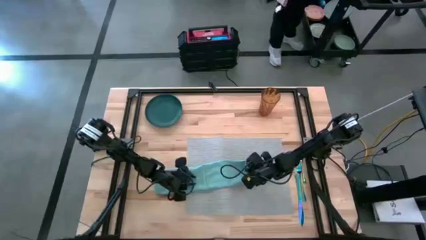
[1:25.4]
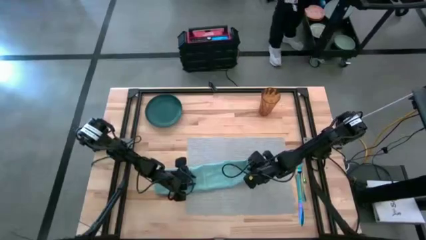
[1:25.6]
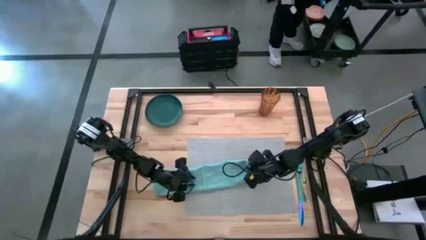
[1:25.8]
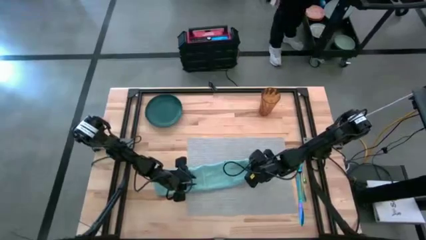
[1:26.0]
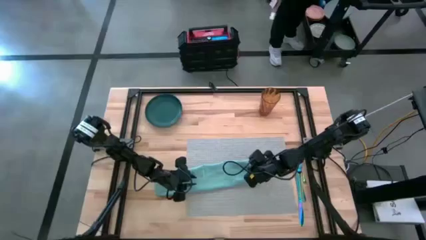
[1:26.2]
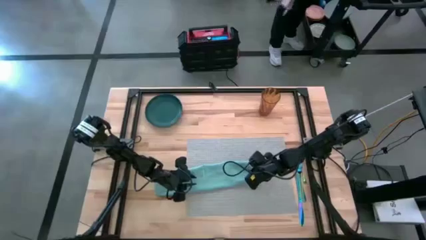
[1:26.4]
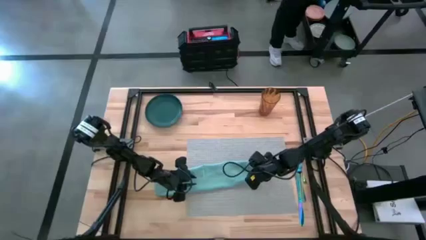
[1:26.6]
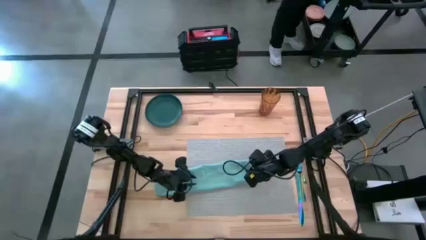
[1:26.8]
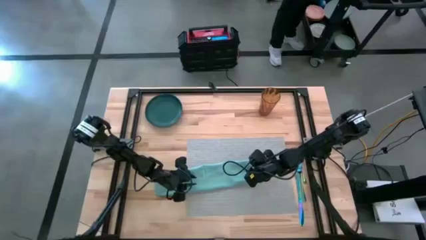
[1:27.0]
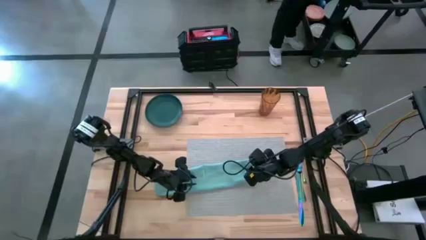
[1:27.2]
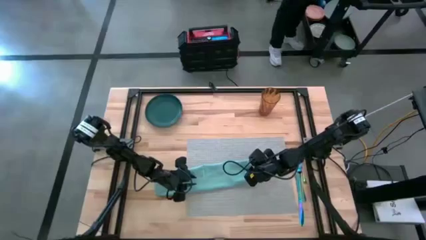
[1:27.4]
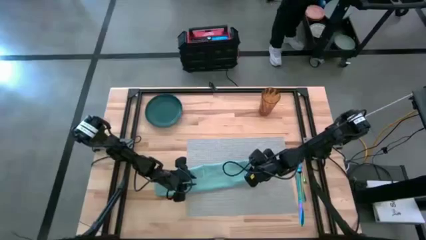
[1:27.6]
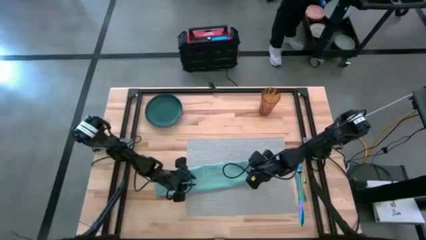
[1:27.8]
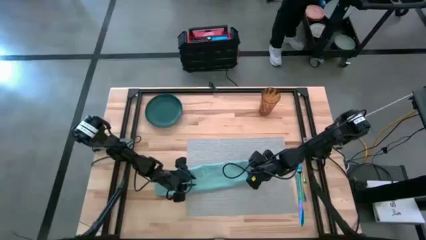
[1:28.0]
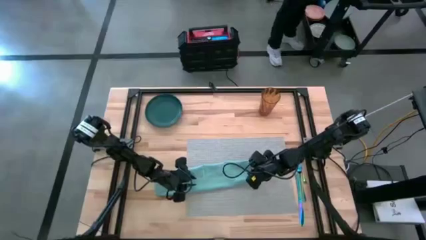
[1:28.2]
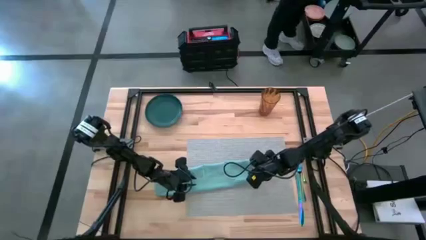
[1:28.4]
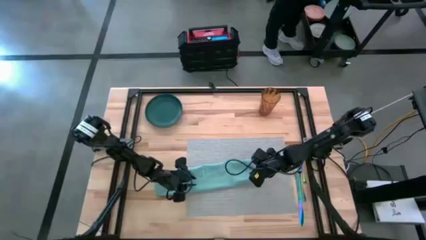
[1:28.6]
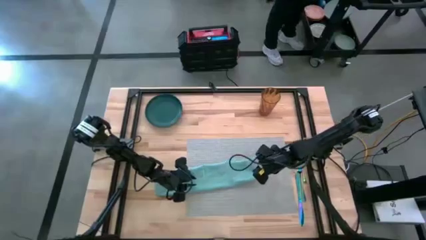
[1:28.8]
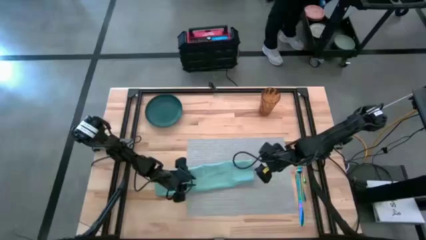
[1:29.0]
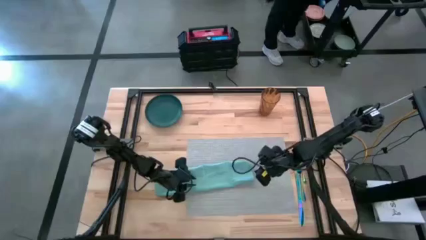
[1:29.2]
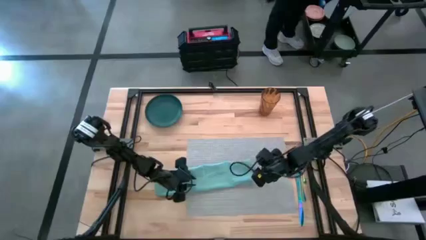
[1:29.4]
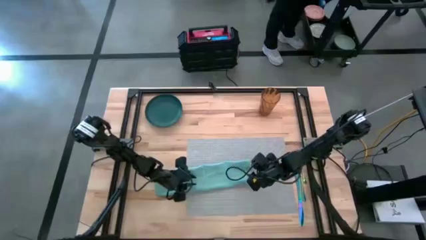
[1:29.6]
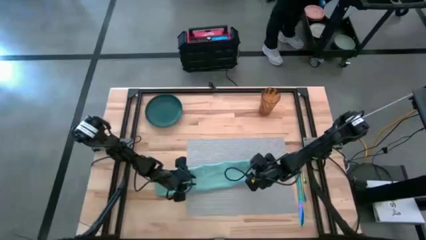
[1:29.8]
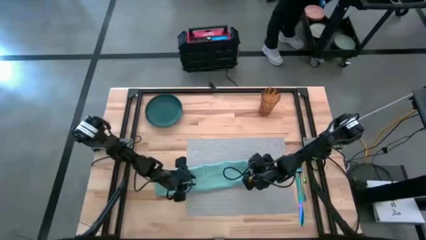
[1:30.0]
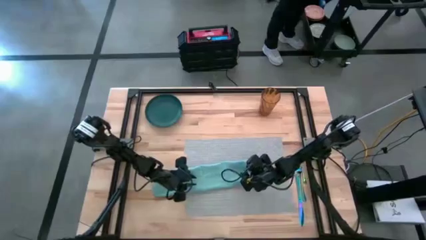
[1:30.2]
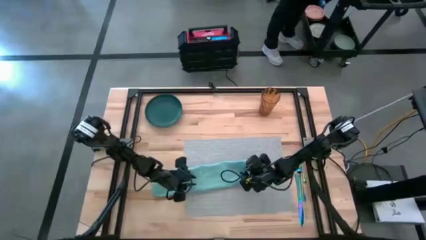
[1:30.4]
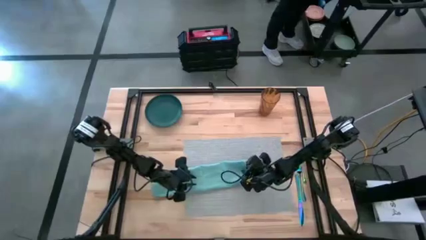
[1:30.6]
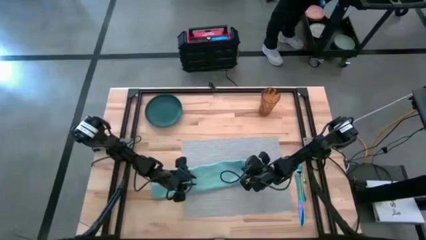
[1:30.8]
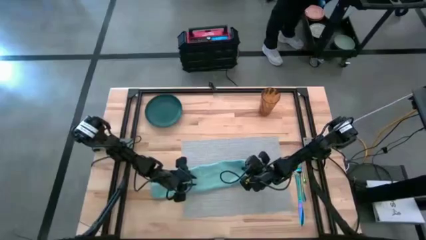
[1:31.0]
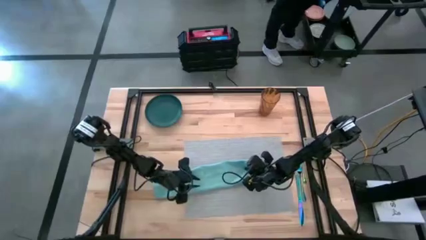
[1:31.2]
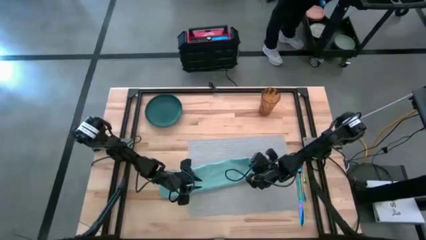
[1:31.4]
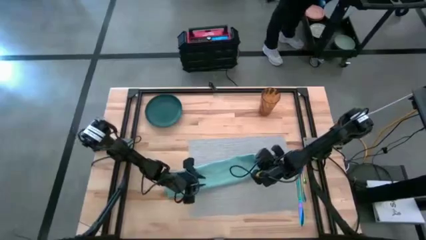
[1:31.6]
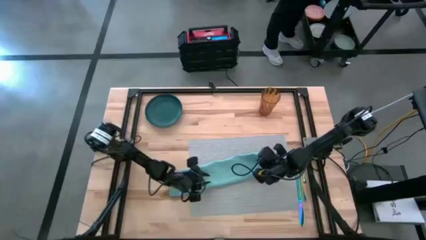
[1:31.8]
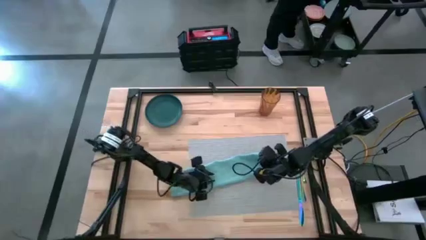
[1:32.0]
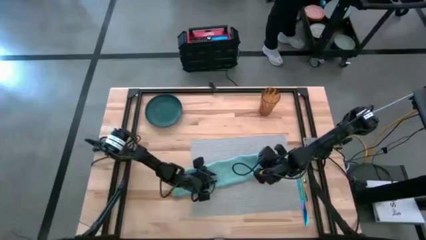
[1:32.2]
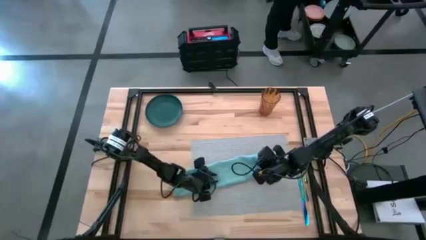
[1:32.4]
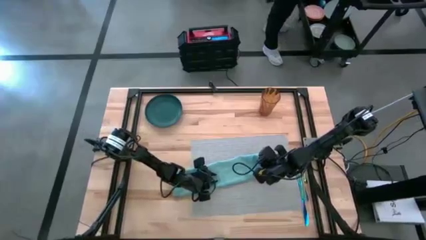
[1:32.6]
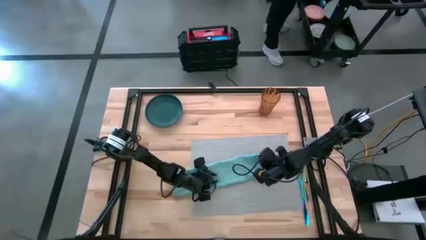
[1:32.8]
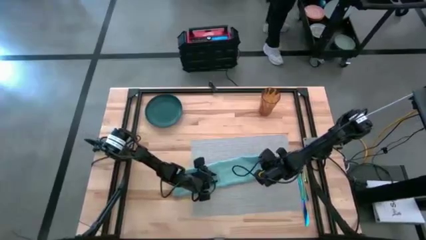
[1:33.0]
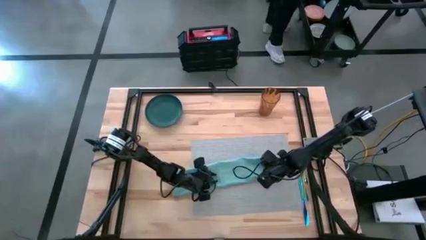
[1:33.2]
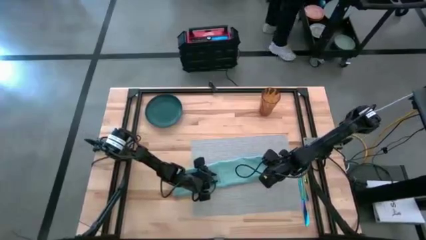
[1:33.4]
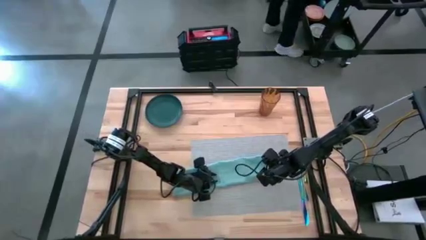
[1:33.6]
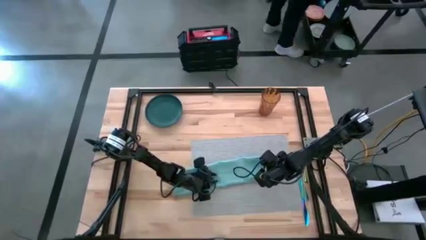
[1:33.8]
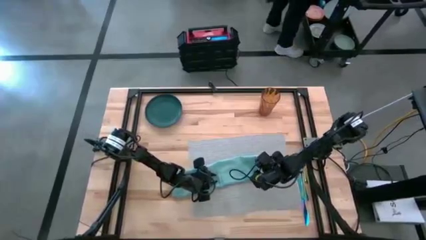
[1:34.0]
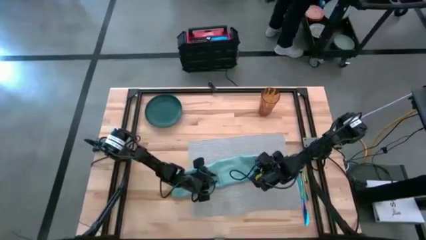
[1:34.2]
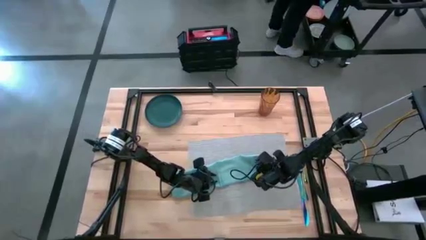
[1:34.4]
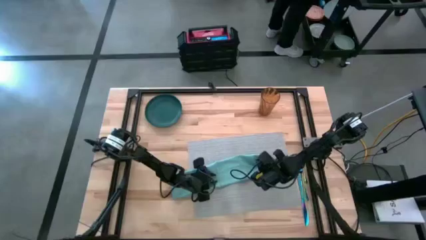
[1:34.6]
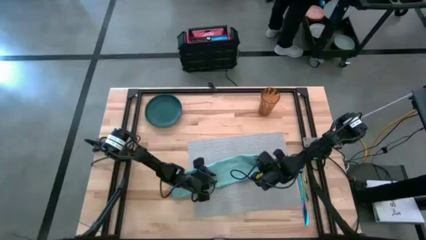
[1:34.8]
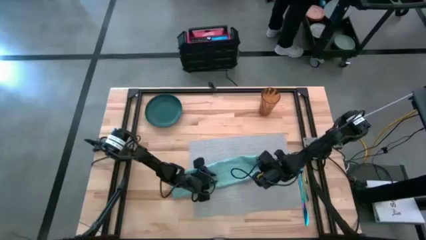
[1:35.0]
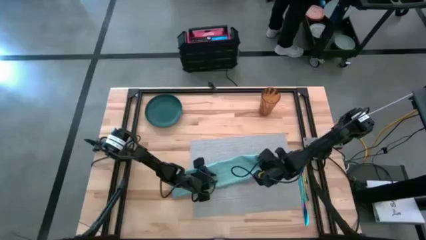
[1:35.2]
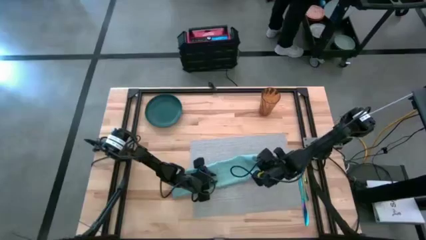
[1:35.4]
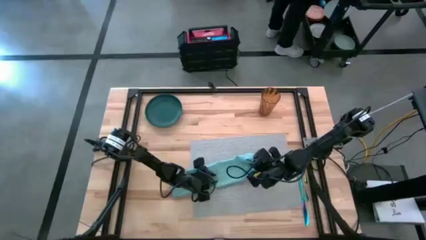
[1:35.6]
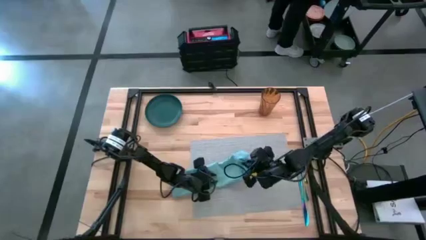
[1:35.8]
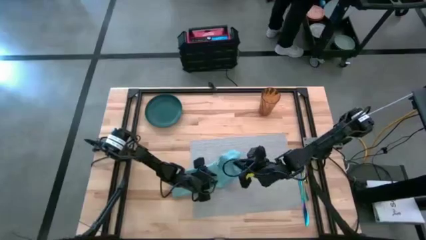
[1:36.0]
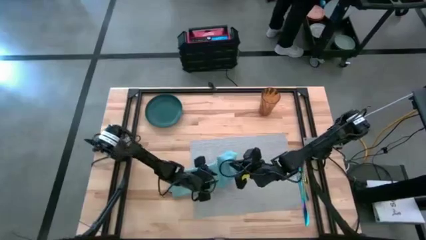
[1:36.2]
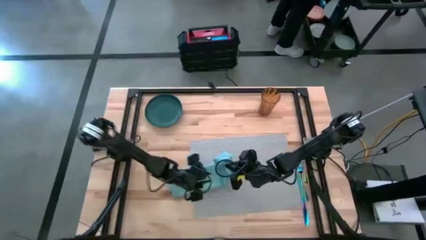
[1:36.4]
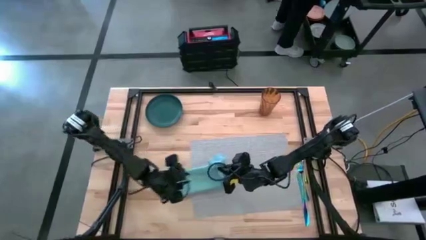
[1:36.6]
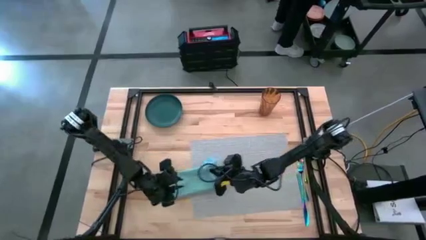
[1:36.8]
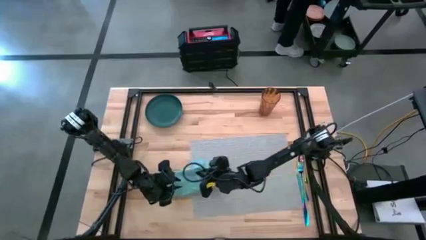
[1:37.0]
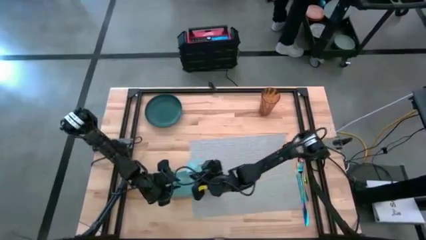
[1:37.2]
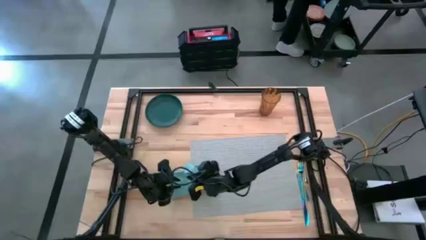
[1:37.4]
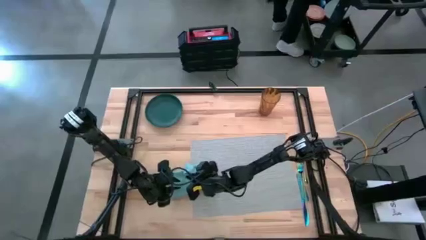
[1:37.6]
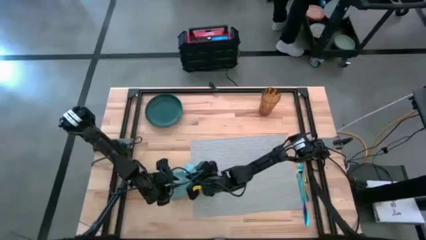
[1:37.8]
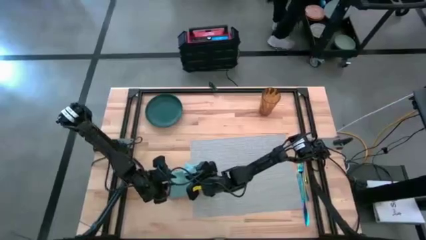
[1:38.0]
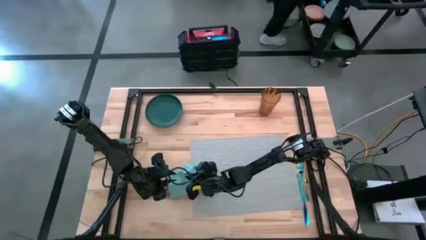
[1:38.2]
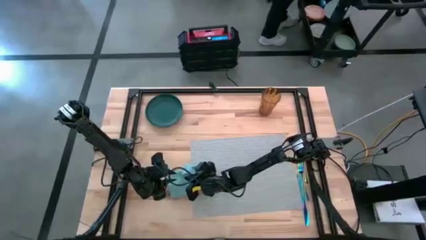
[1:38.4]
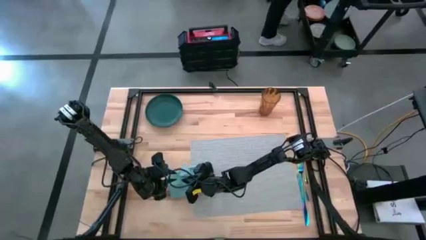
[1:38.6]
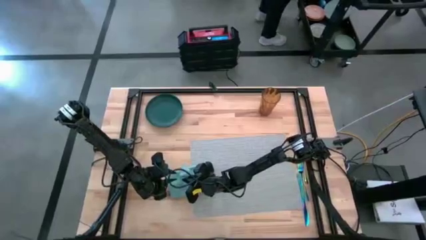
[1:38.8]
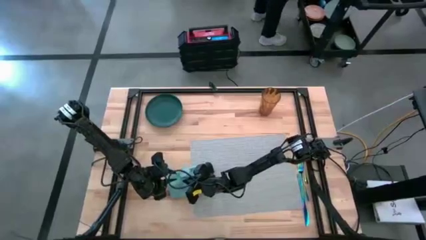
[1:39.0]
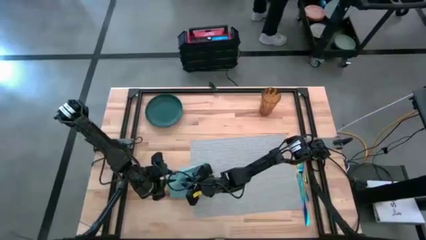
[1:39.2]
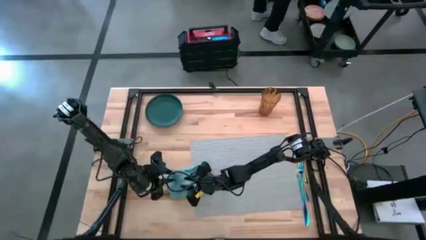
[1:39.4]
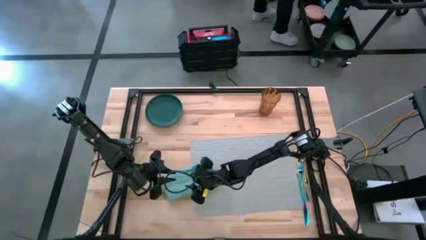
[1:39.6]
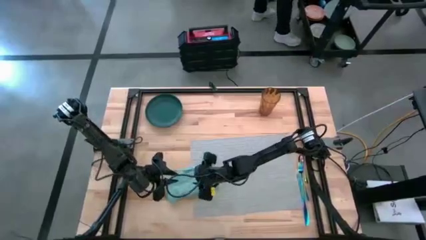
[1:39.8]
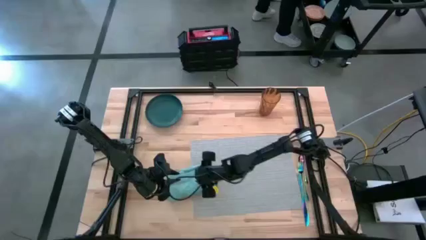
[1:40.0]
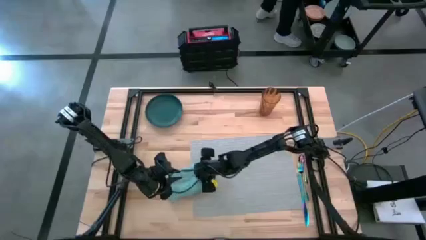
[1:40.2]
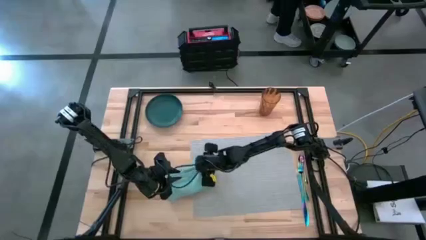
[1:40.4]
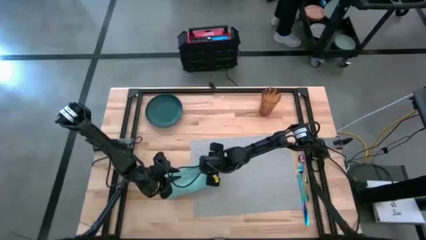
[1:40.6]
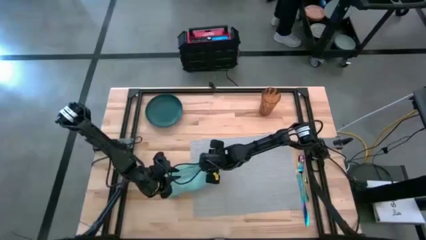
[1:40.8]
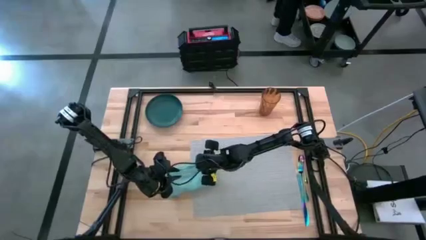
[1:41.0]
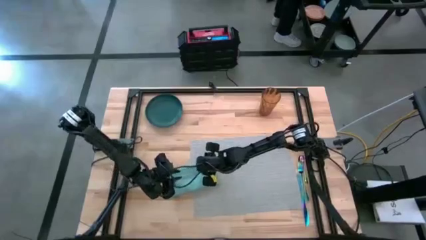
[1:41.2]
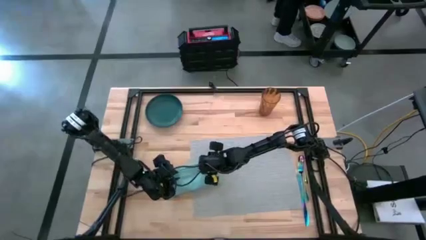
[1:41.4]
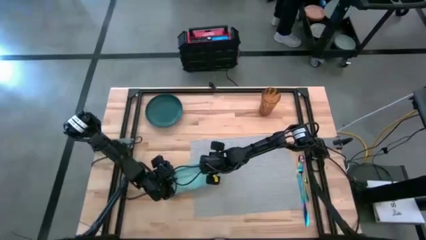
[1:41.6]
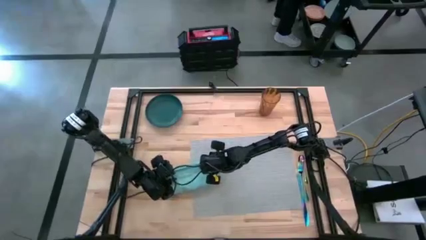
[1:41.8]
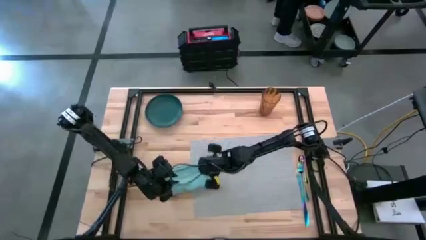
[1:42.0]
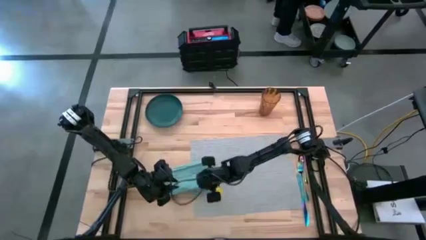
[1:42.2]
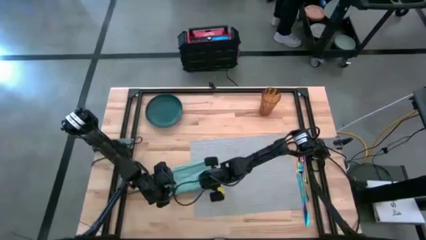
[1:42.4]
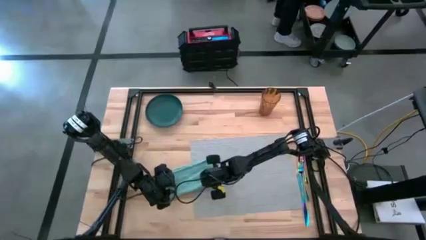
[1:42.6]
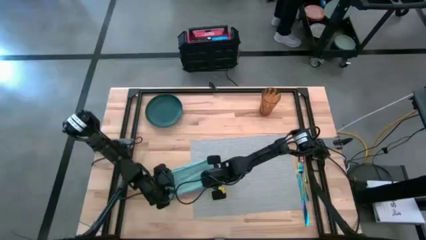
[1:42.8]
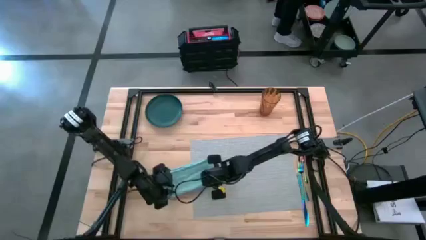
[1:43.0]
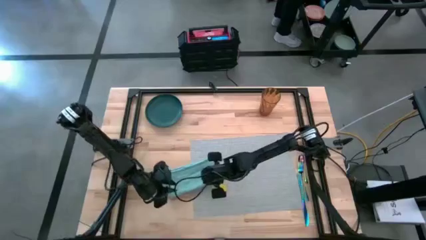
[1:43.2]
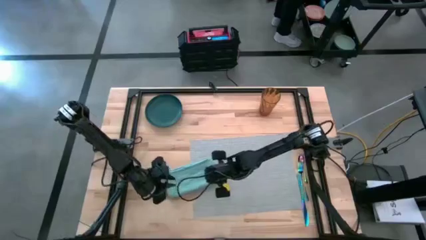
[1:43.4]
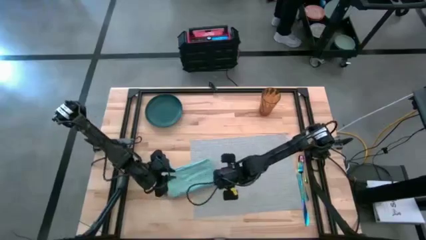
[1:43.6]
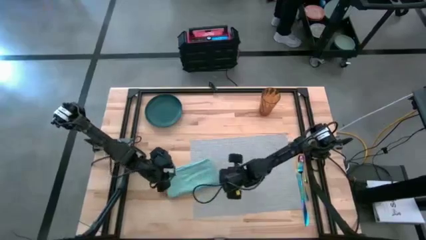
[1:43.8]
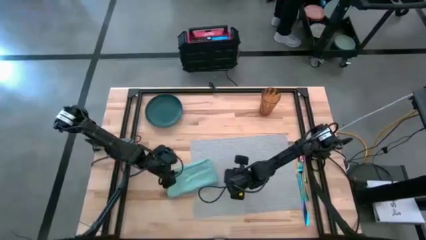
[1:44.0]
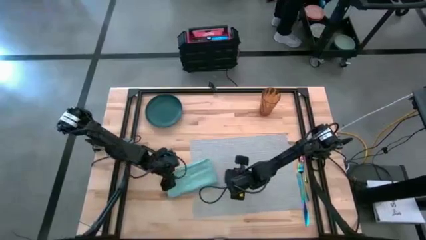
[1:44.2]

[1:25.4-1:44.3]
Task: Set table place
Fold the light blue table napkin
